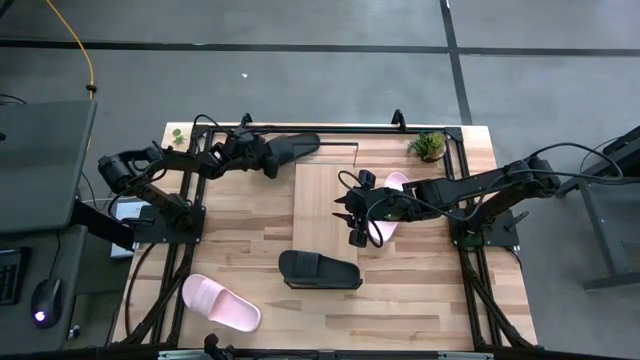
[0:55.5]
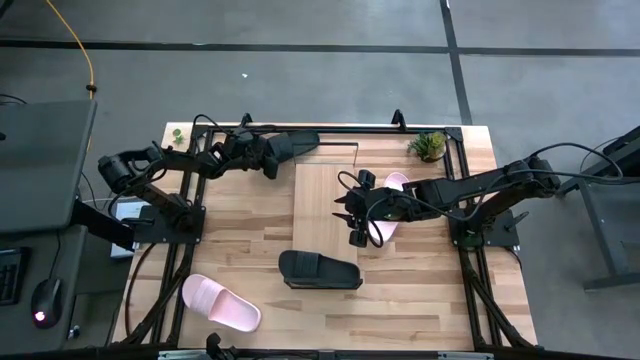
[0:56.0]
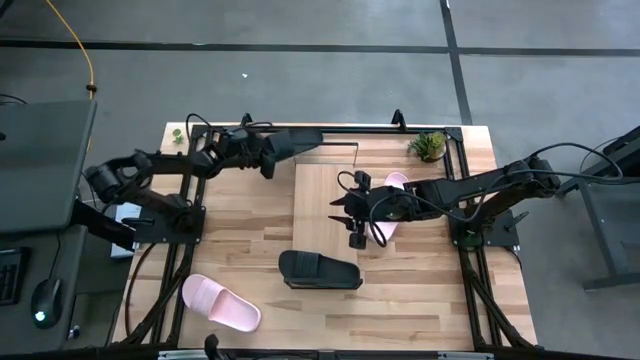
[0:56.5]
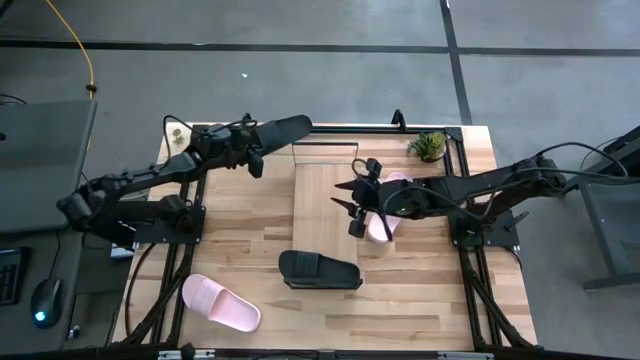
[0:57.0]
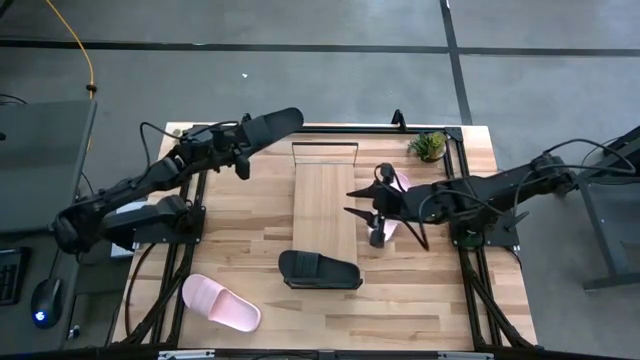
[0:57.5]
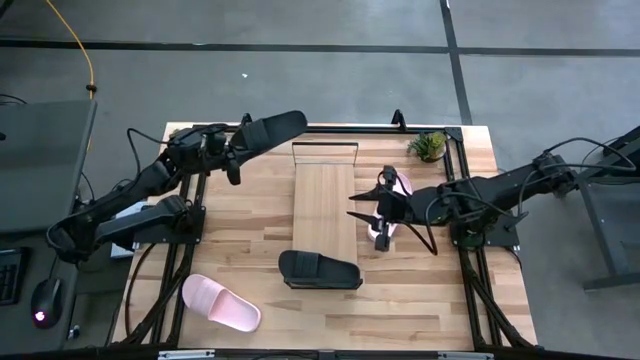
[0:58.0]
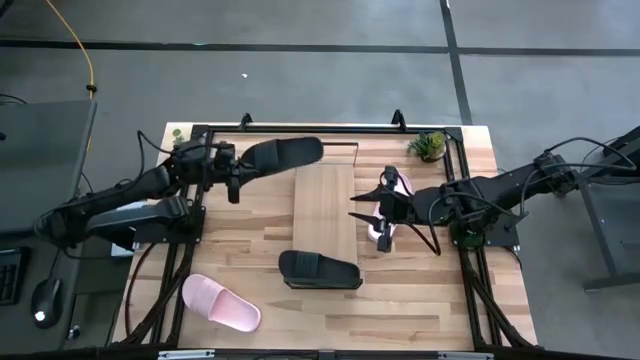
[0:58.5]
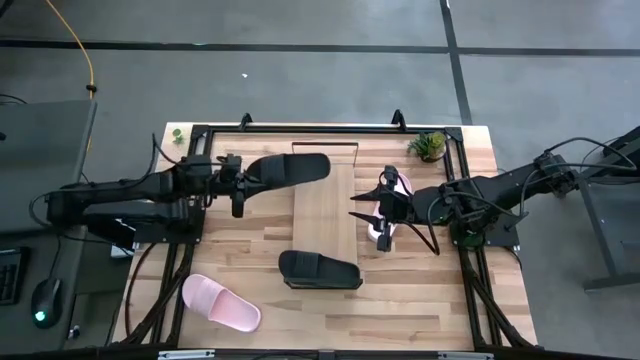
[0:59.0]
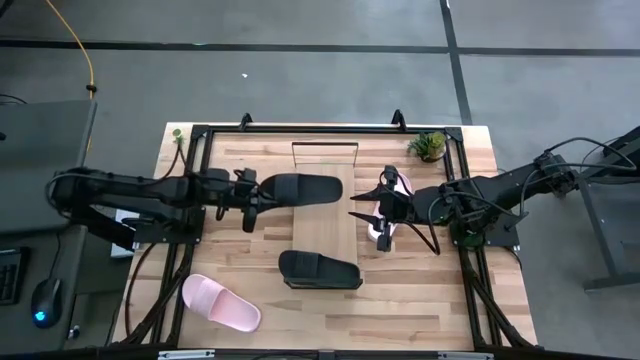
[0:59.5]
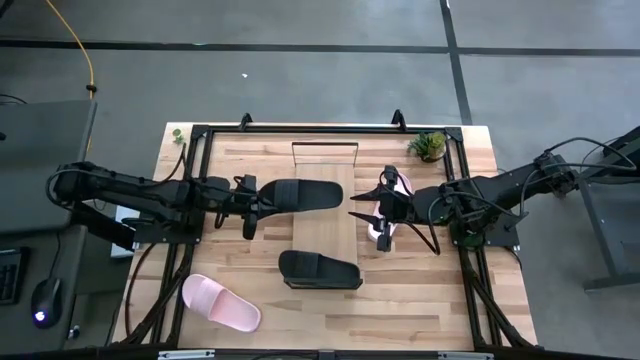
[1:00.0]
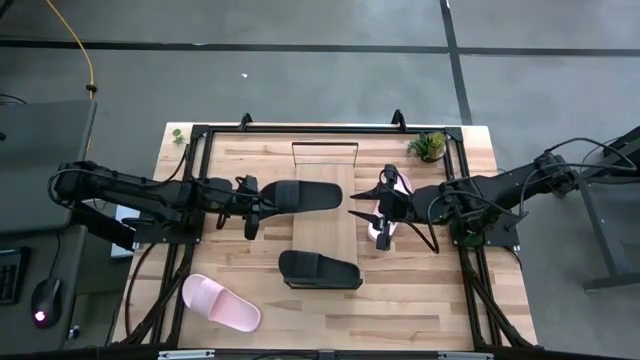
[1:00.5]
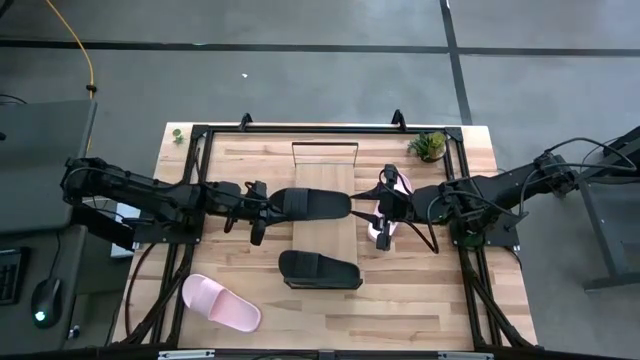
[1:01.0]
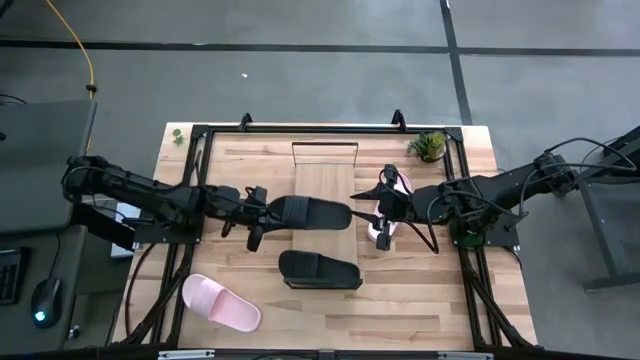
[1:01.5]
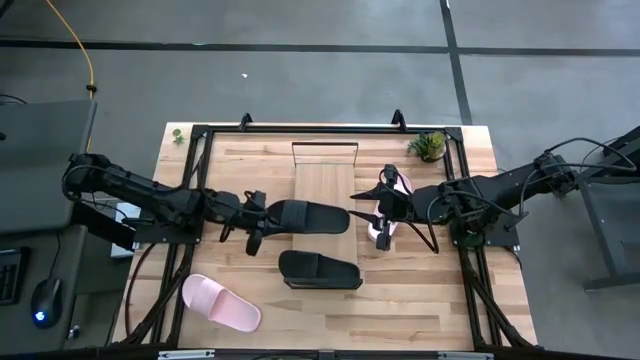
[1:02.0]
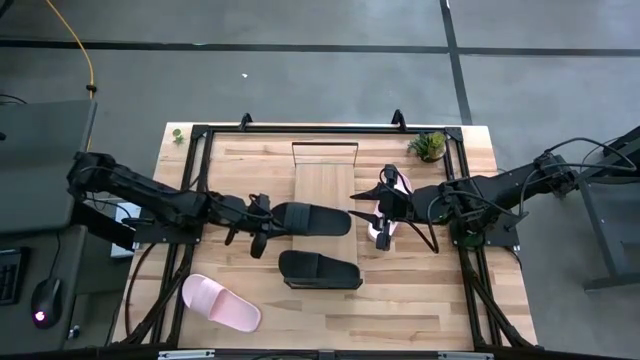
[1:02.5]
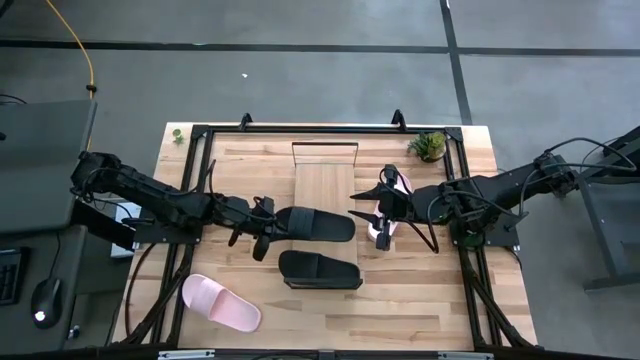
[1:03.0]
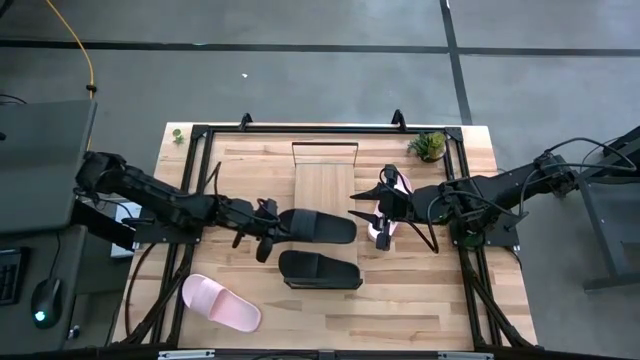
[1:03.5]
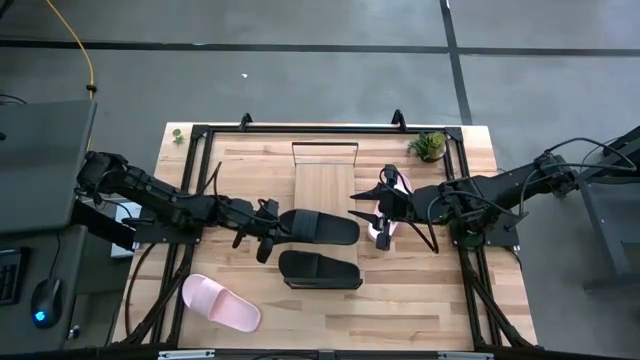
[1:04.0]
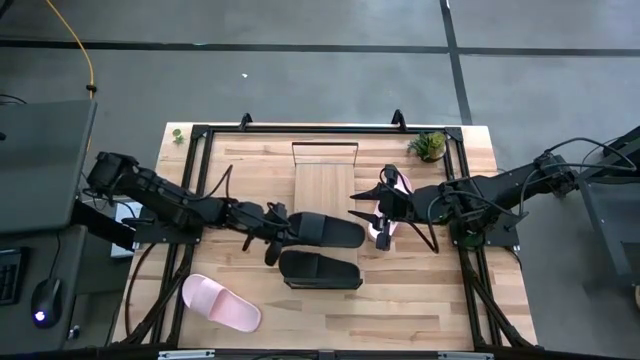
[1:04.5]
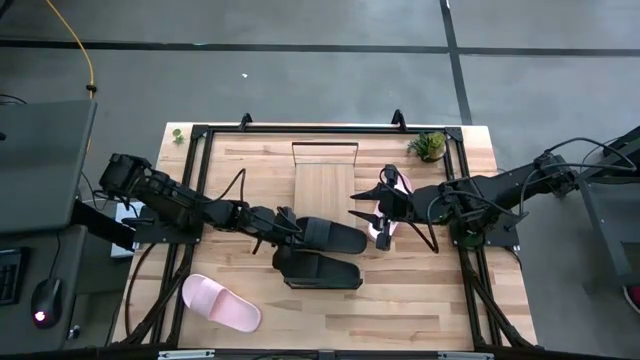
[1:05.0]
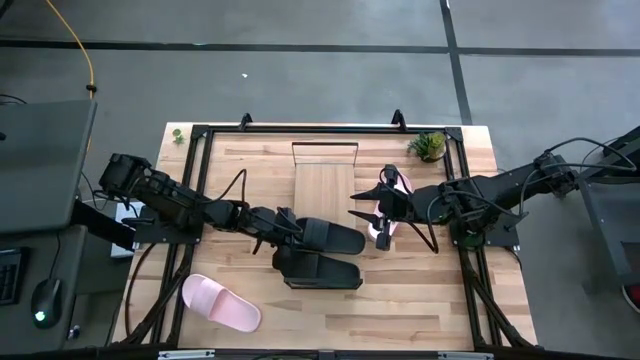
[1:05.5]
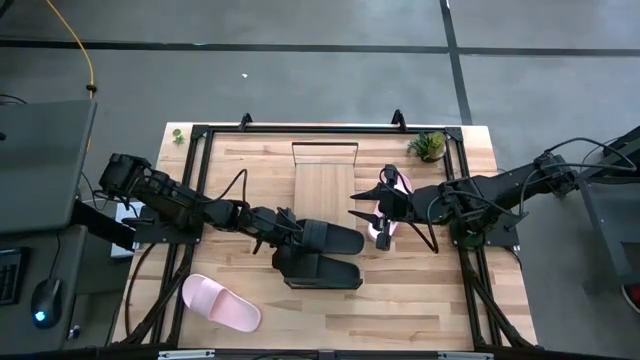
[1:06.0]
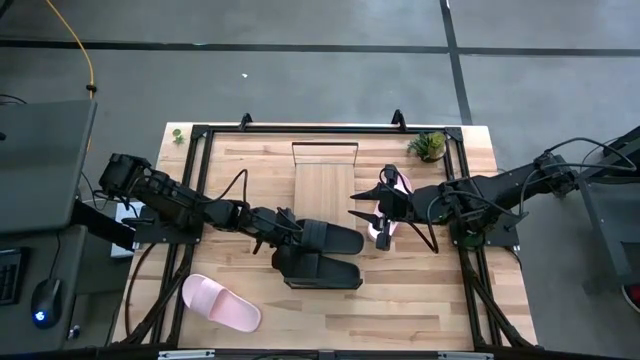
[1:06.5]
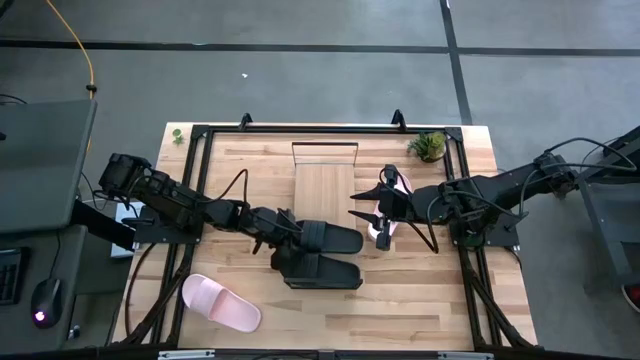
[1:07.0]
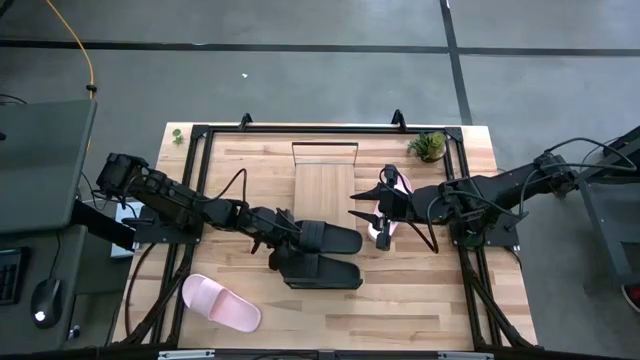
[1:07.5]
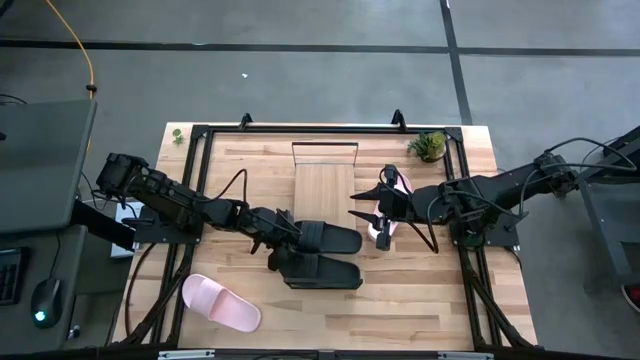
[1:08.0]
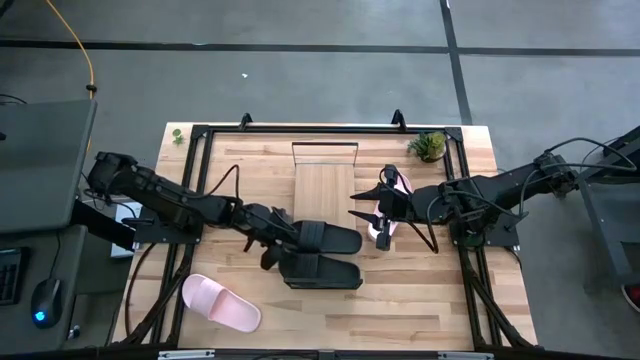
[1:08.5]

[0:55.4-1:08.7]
Task: Pick and place slides into the shelf
Put the black slipper on the shelf

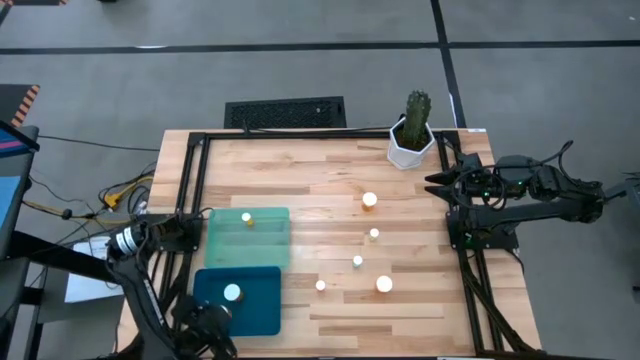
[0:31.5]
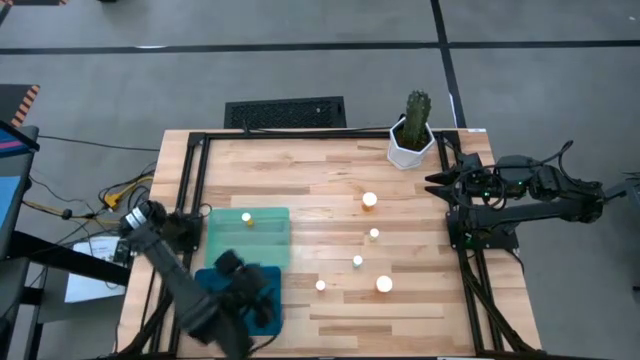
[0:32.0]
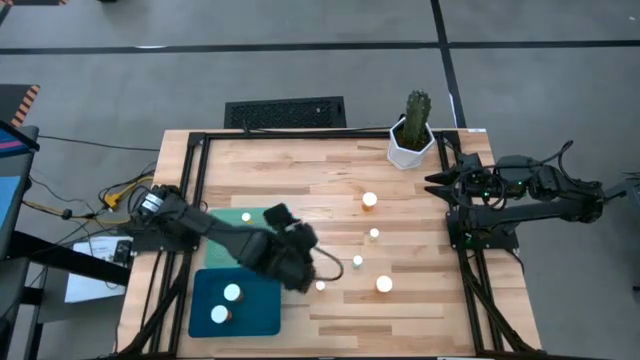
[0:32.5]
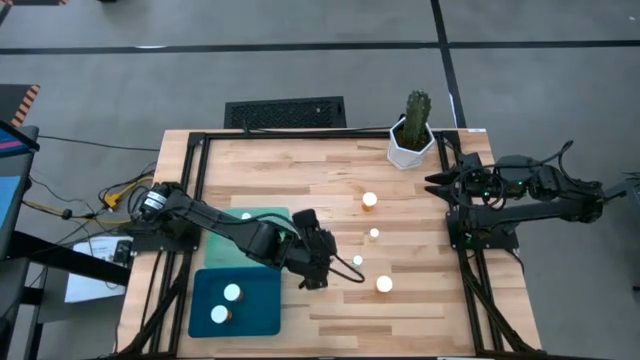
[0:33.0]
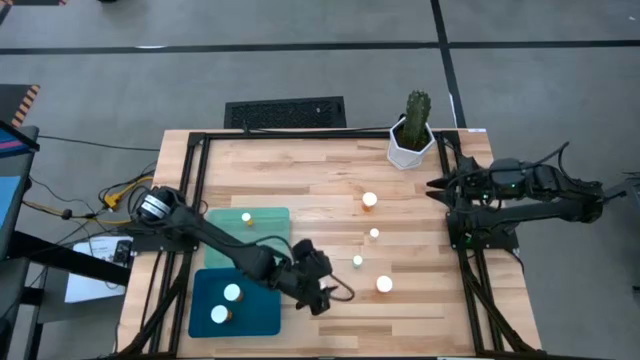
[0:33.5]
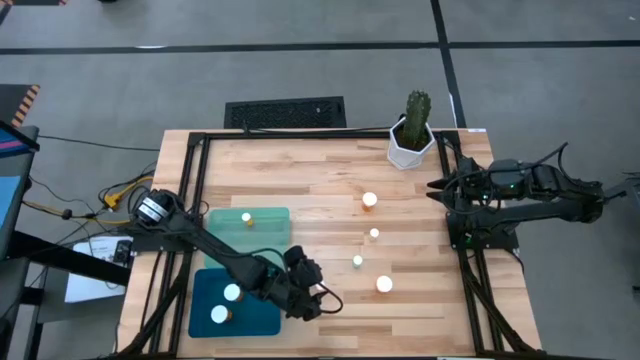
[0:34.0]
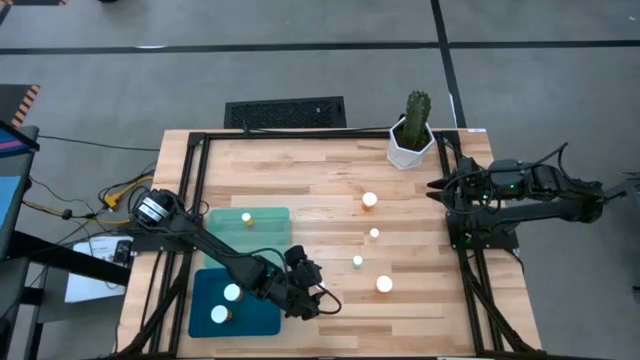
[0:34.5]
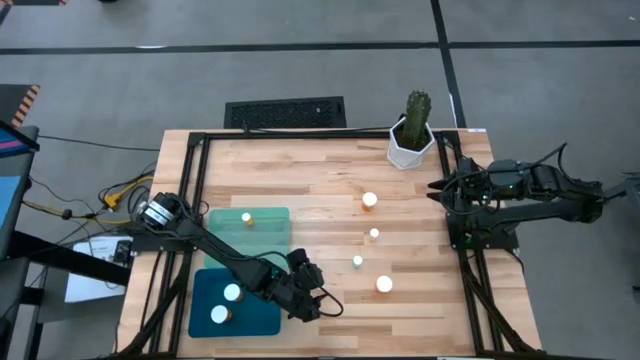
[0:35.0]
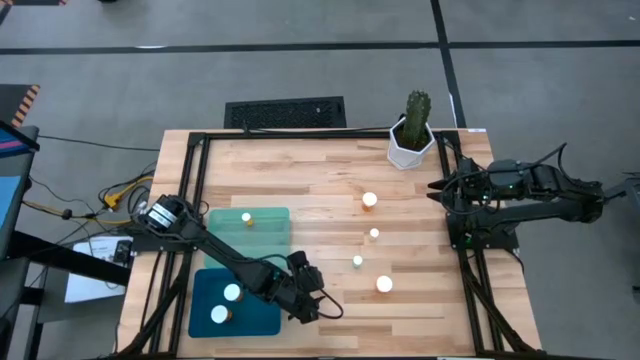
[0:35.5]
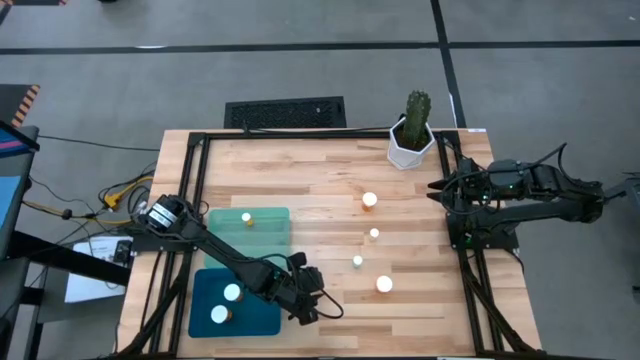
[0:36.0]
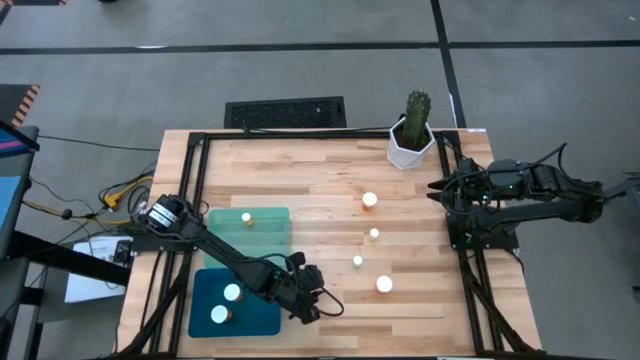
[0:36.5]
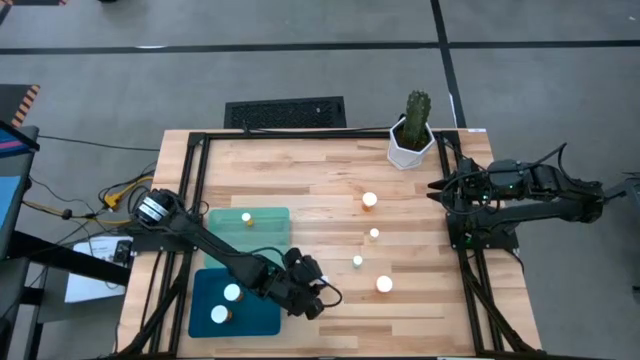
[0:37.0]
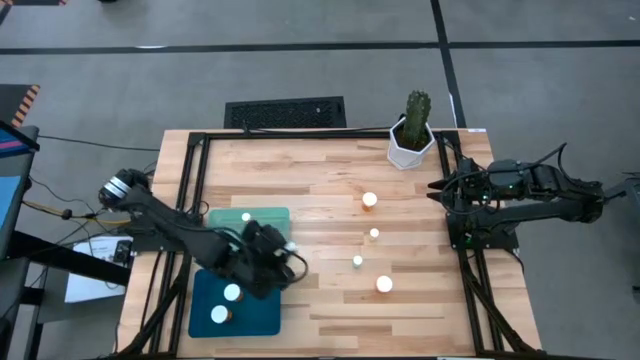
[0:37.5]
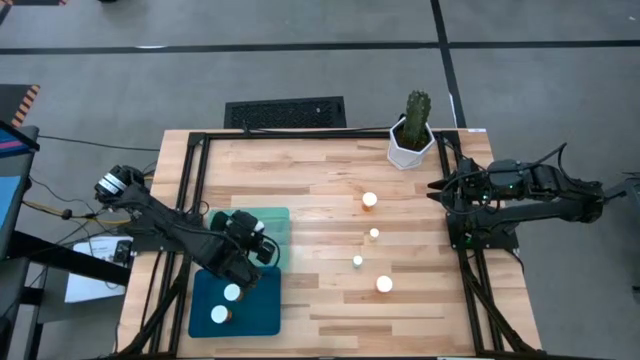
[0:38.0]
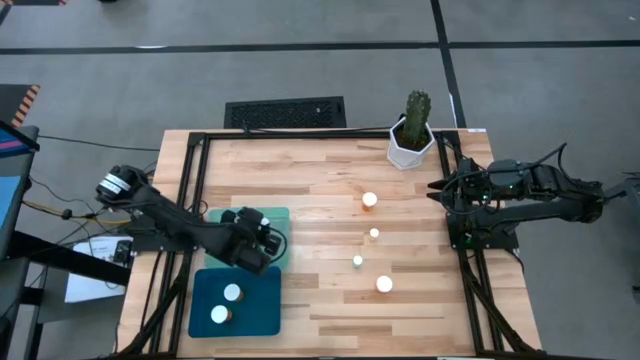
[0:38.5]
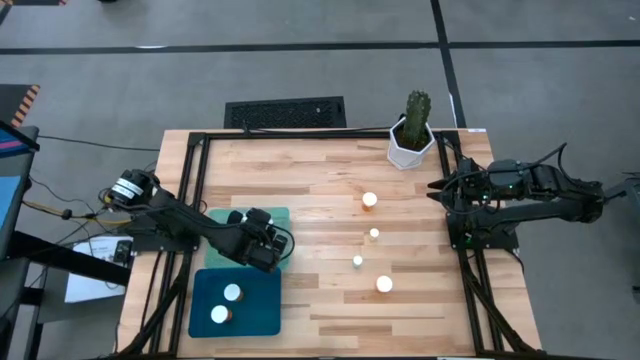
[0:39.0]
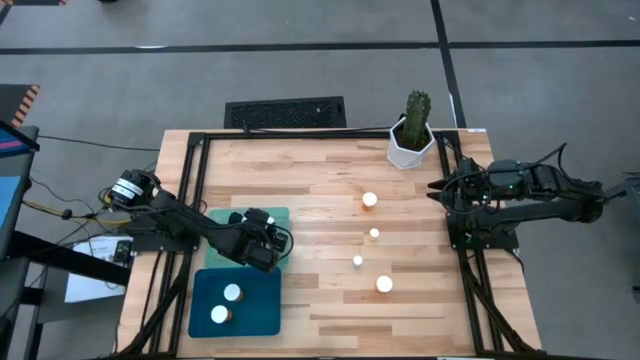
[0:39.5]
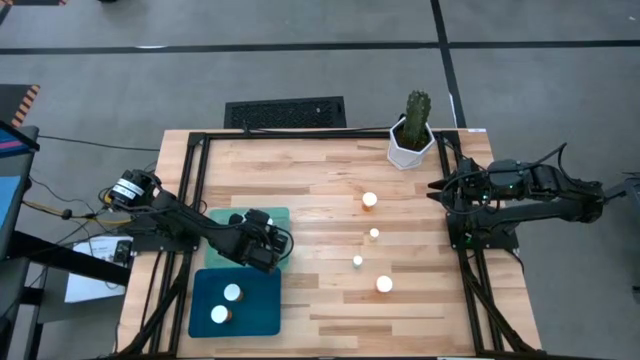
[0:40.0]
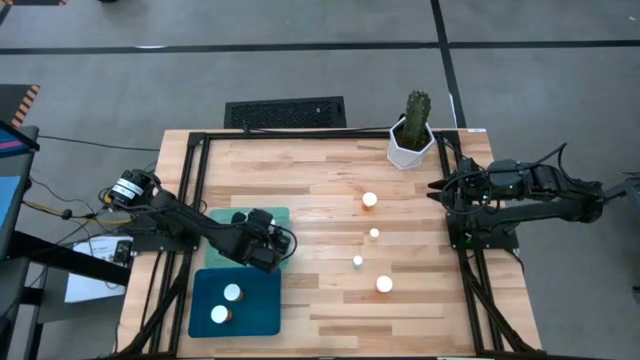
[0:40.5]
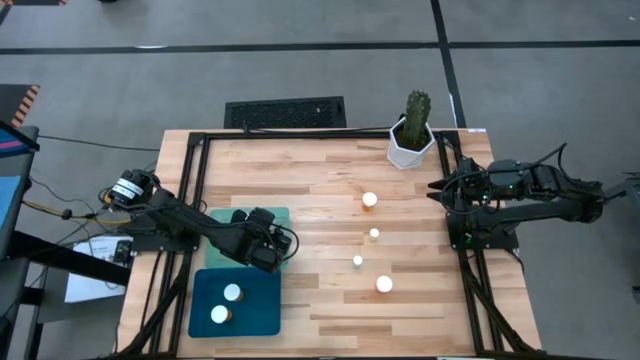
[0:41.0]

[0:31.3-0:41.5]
Task: Pick and place medicine bottles into bin by pill shape (circle, oval)
Put the small pink pill bottle into the green bin
